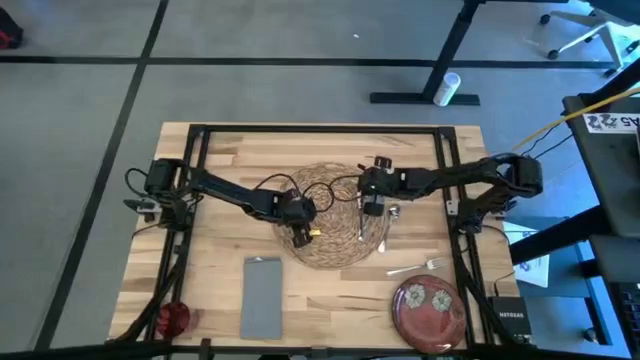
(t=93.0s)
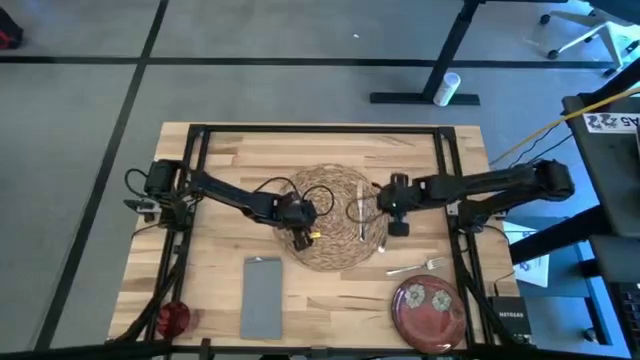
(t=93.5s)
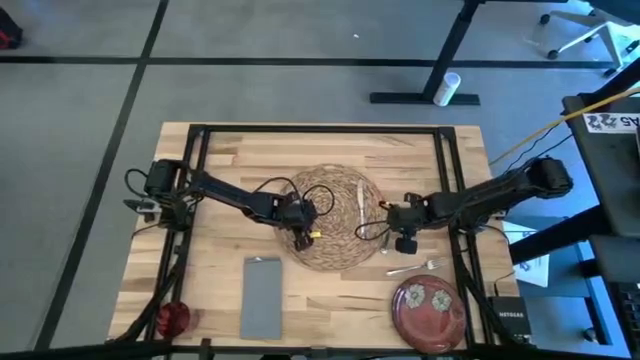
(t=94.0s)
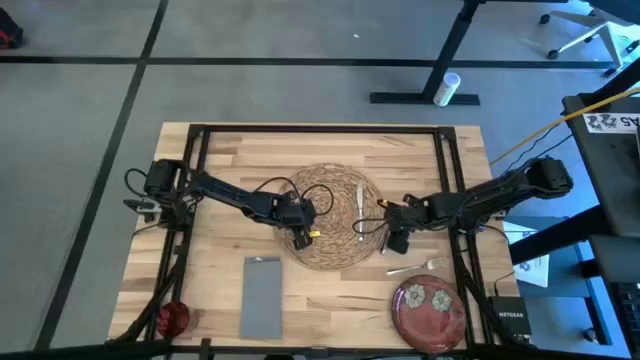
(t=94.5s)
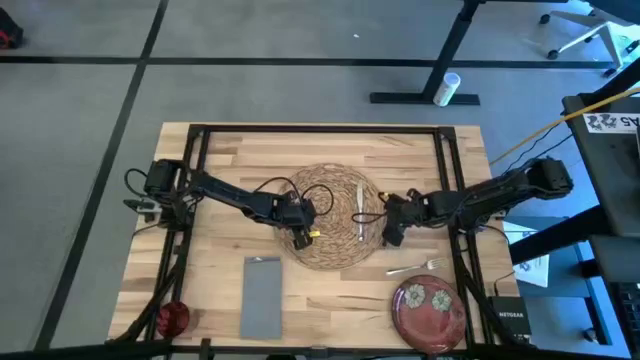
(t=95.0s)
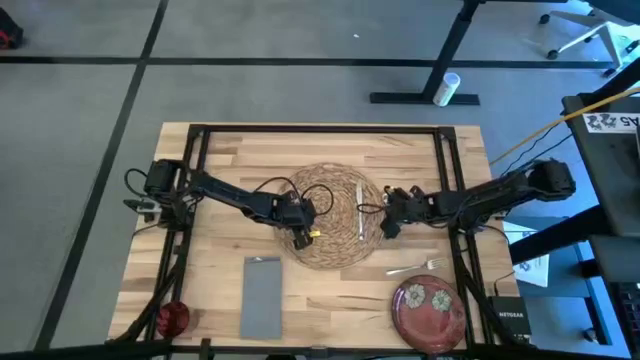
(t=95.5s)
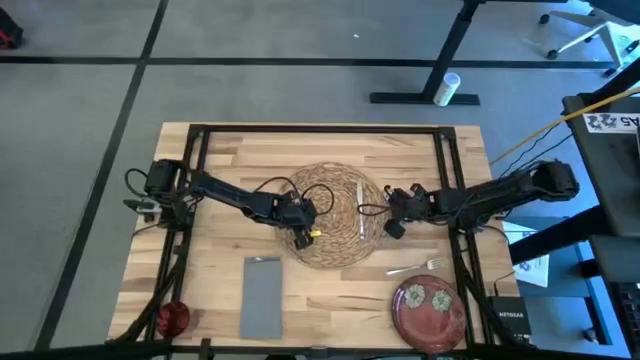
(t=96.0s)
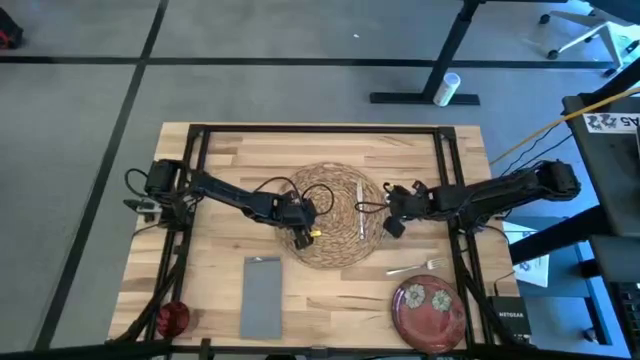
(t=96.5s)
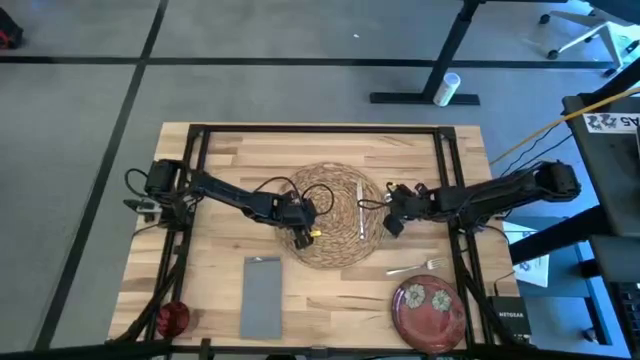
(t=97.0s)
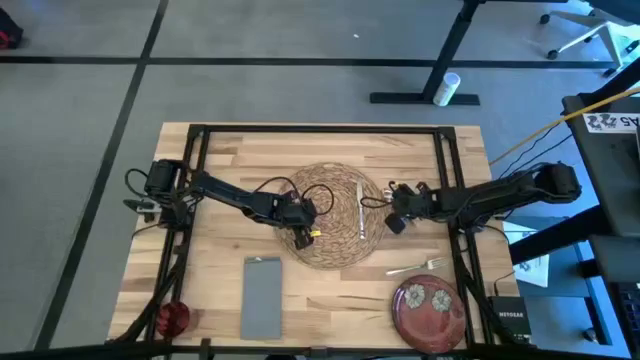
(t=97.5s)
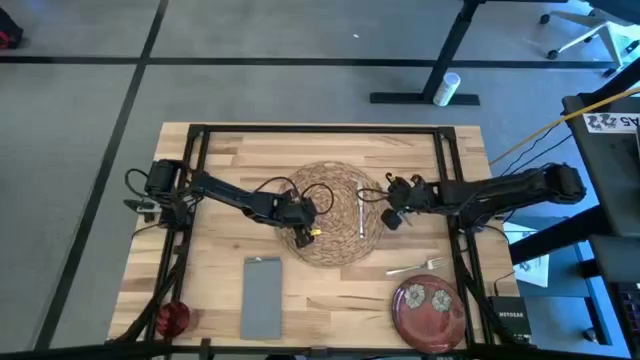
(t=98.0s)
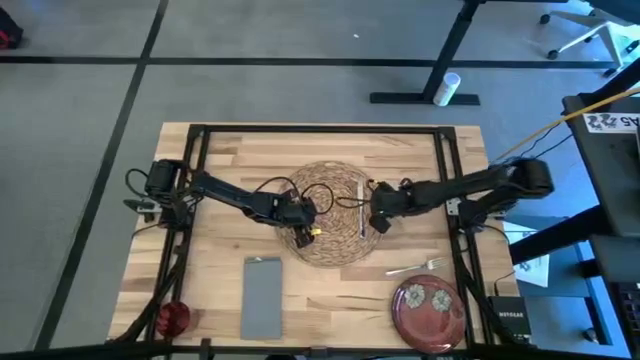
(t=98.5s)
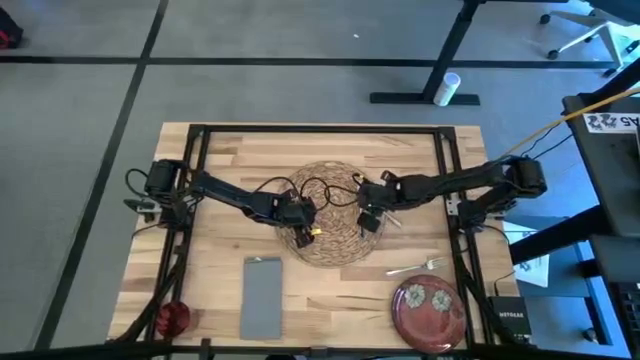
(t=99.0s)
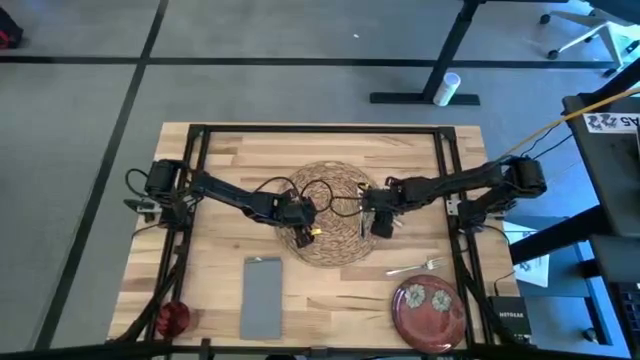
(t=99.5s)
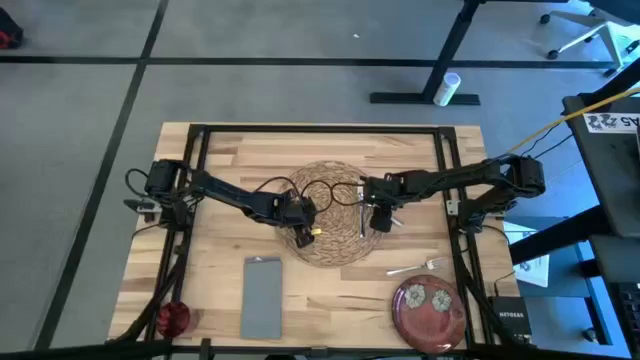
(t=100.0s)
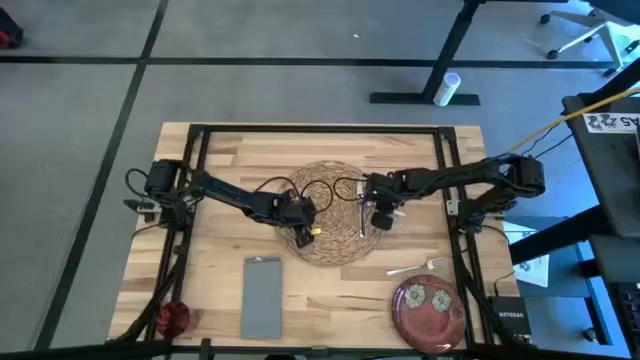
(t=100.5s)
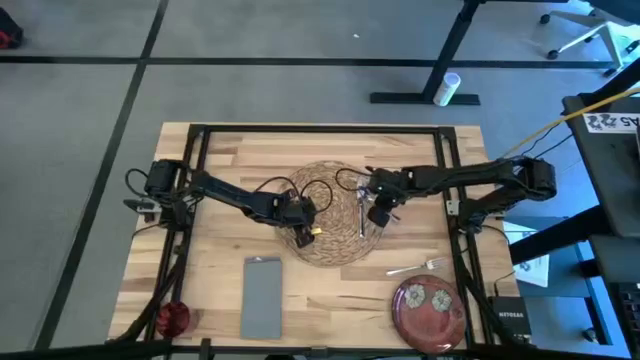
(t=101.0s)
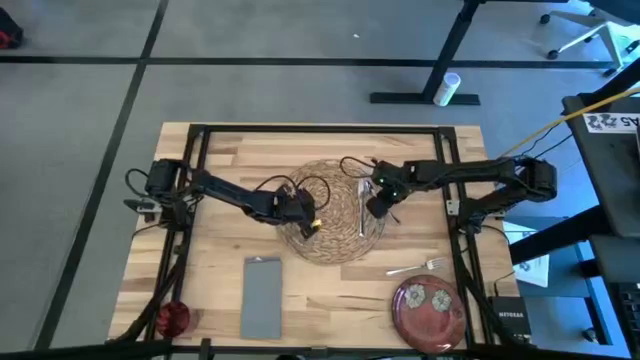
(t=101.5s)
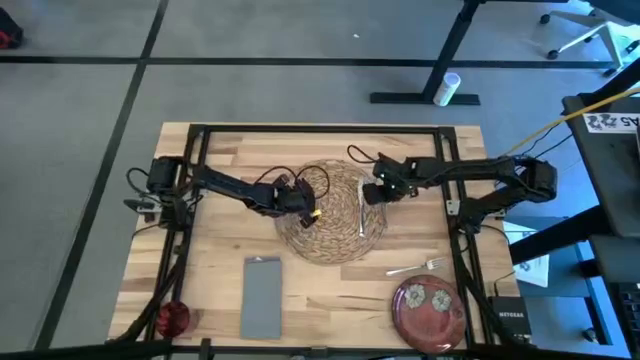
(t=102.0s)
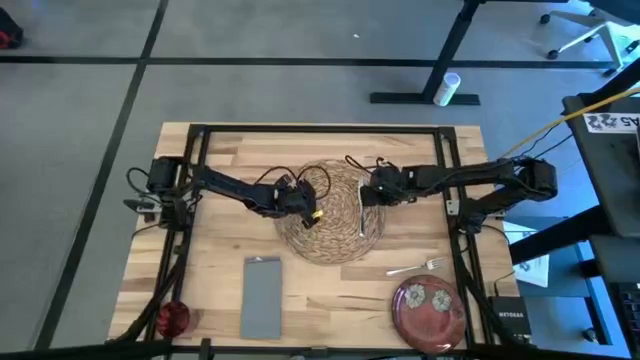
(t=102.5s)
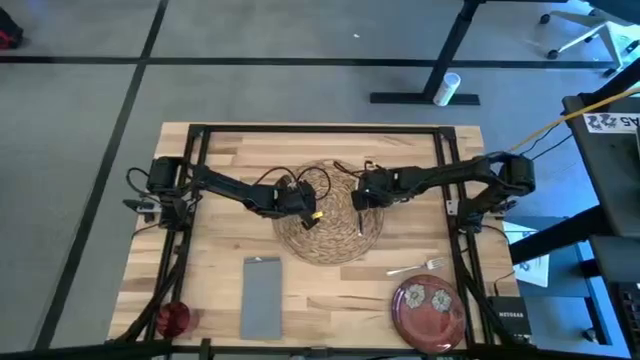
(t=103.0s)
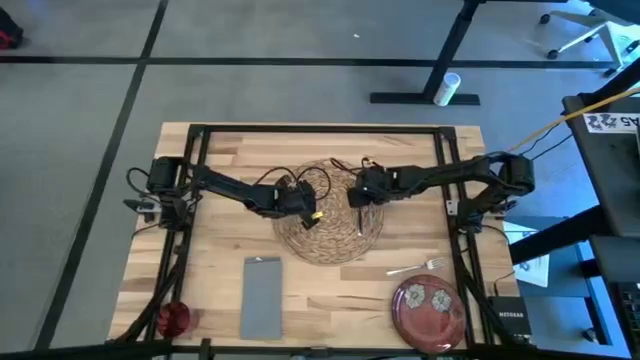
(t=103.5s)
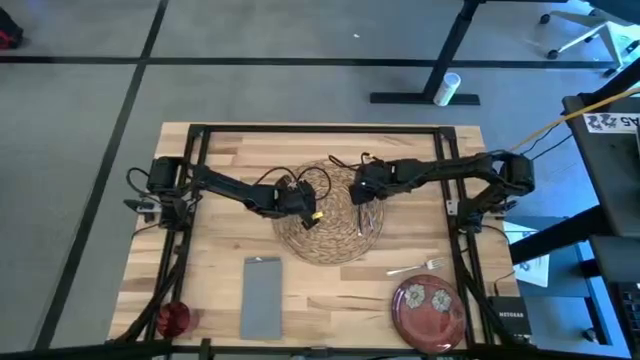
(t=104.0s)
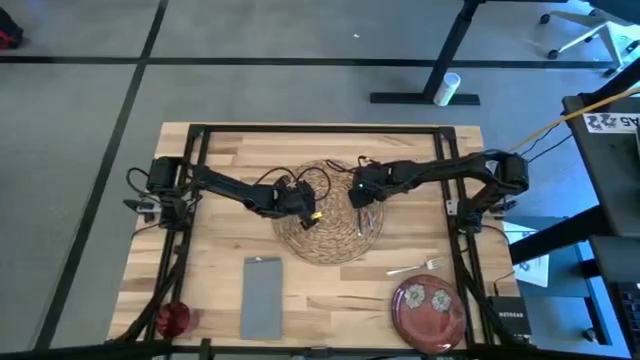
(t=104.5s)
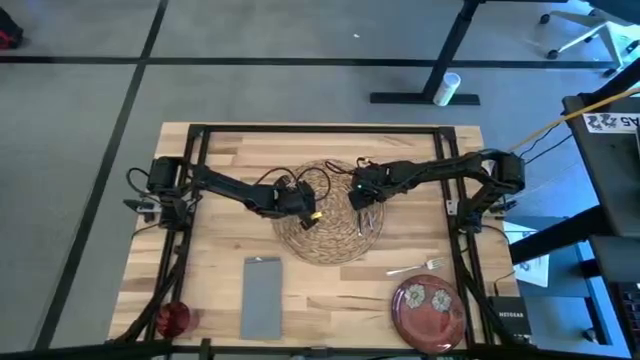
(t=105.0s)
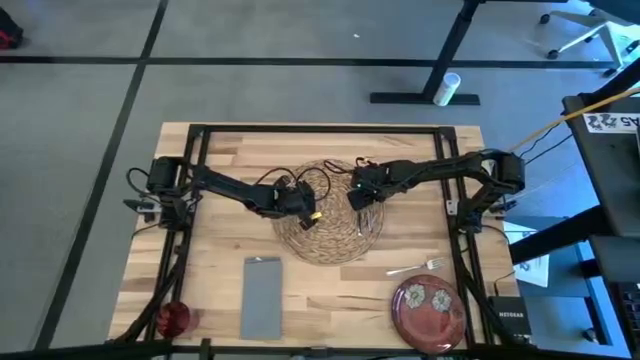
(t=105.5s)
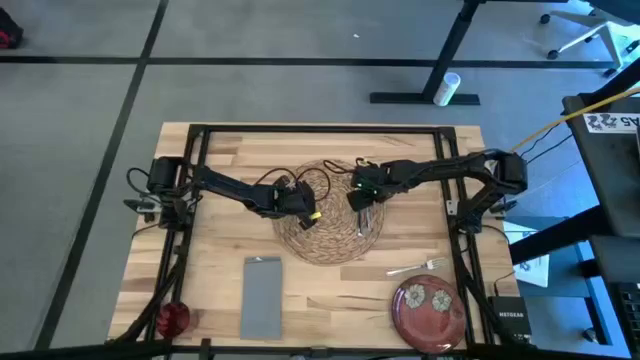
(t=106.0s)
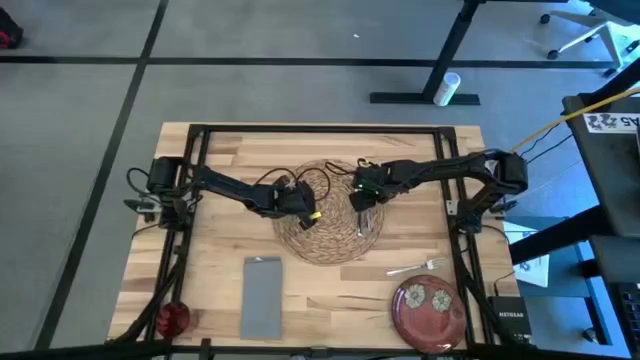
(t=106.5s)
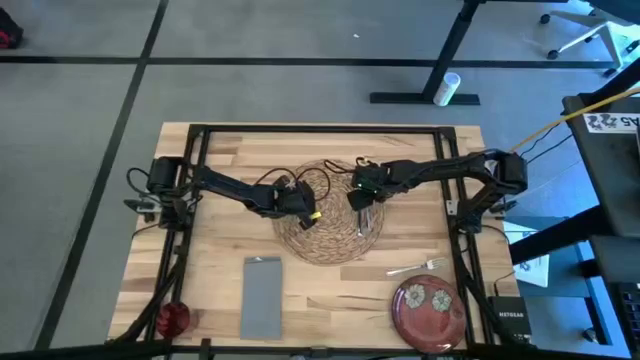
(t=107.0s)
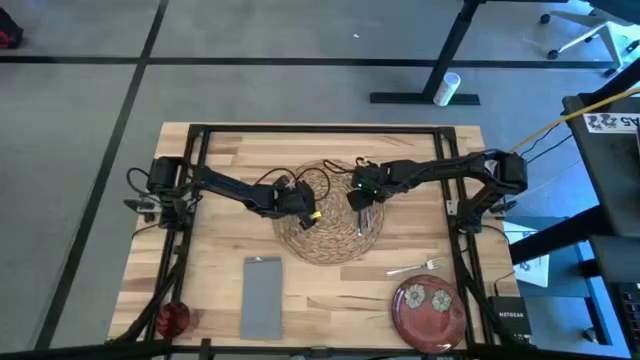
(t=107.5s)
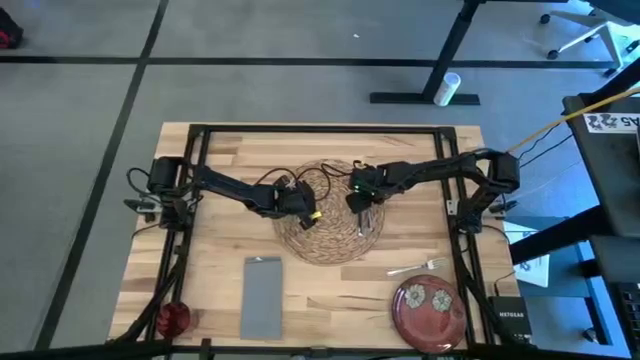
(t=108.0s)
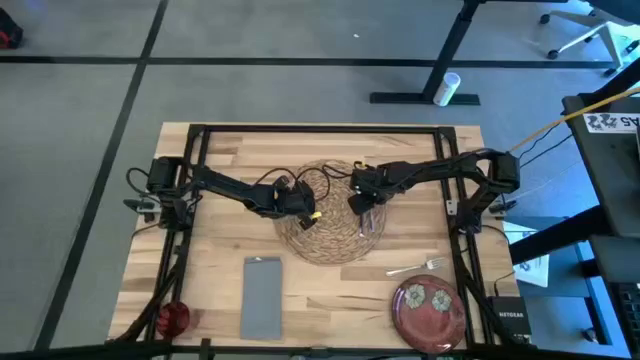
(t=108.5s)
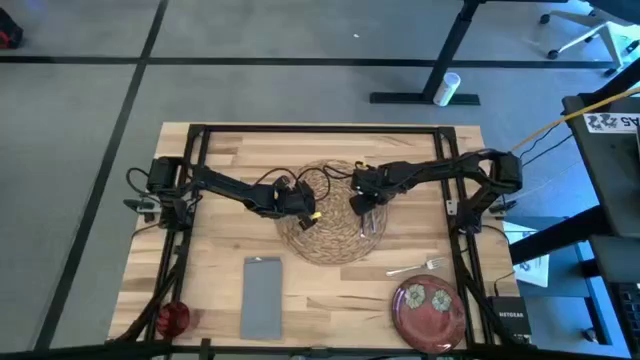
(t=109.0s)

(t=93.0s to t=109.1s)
Task: Set table place
Put the silver spoon to the right of the silver table knife on the brown placemat

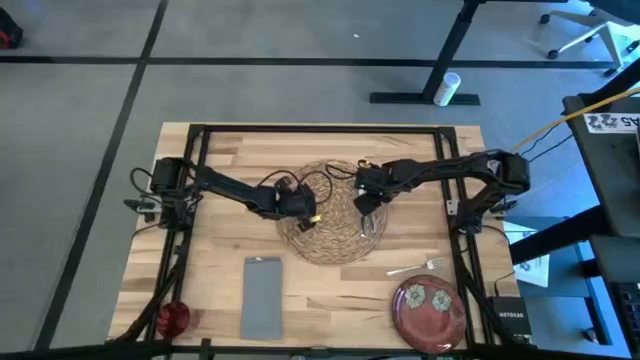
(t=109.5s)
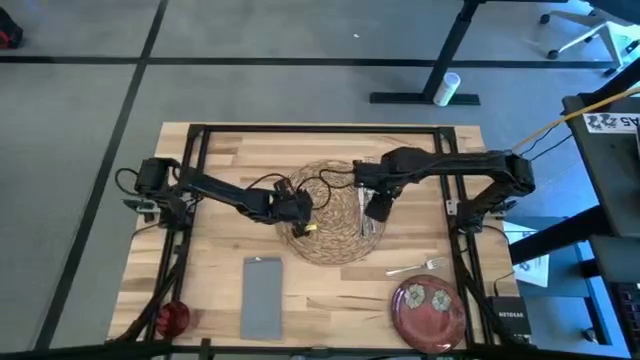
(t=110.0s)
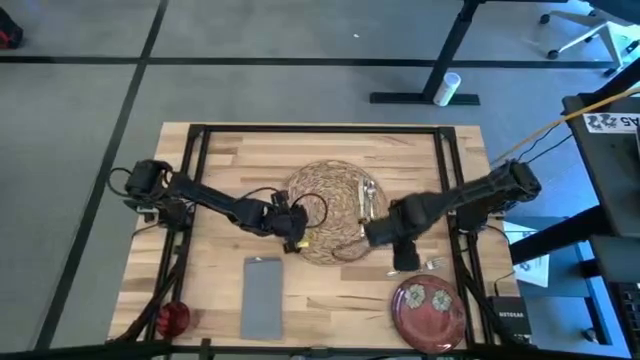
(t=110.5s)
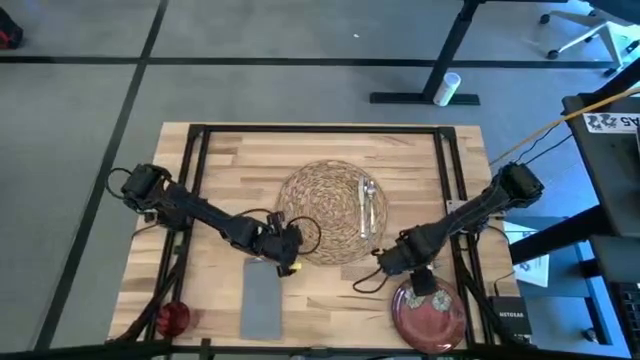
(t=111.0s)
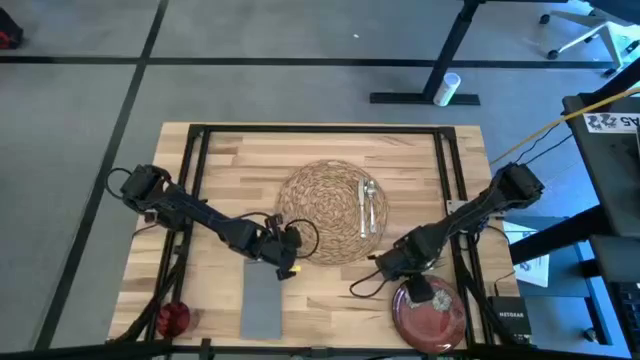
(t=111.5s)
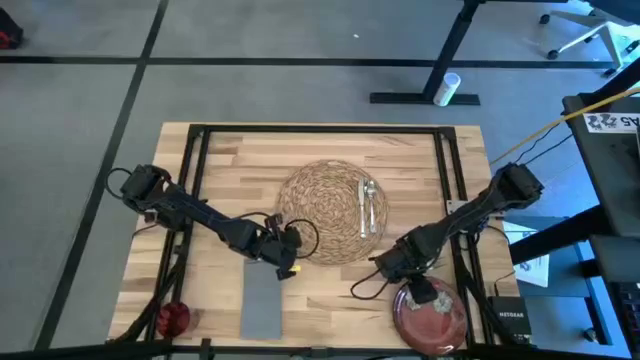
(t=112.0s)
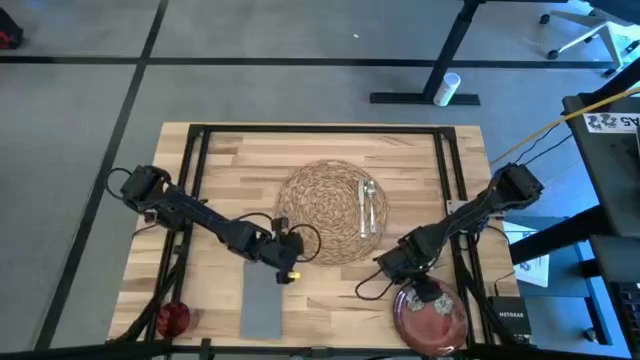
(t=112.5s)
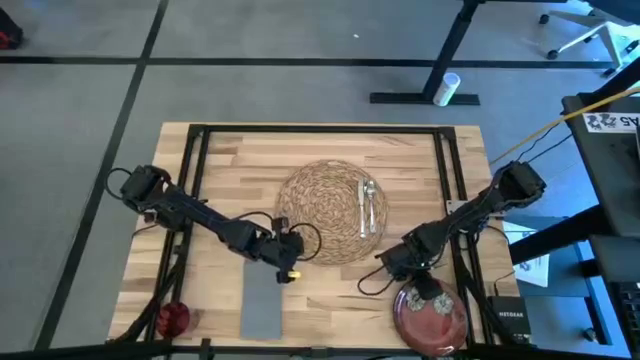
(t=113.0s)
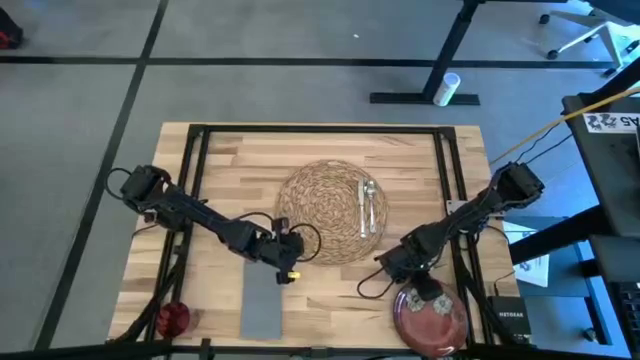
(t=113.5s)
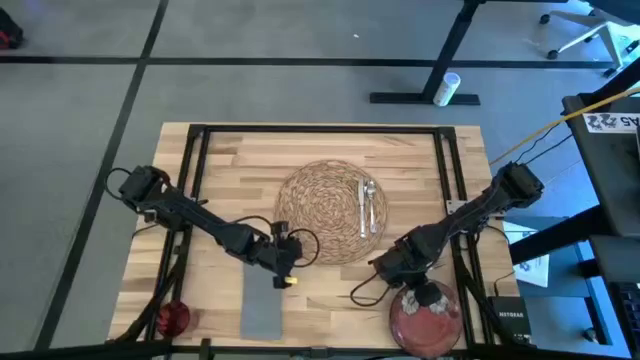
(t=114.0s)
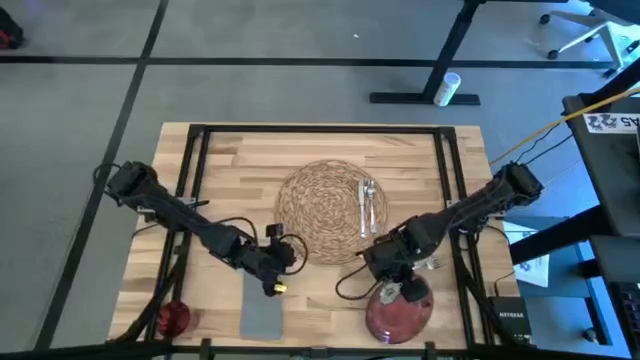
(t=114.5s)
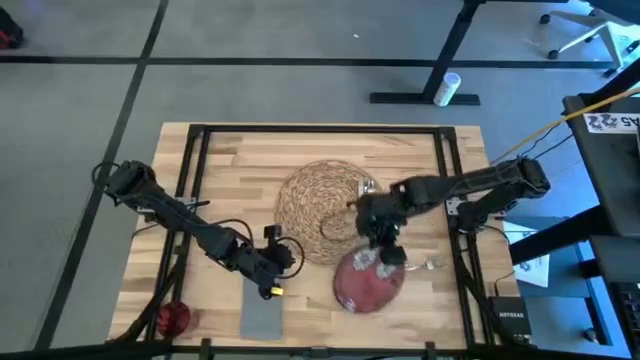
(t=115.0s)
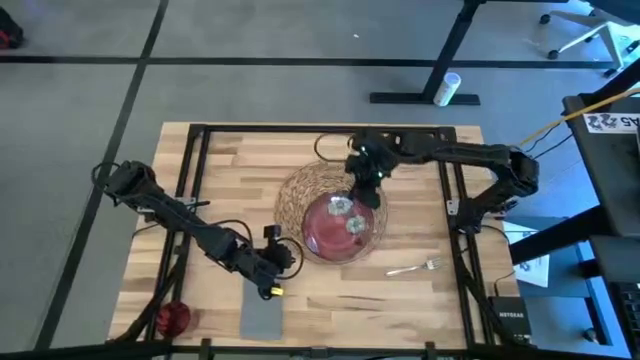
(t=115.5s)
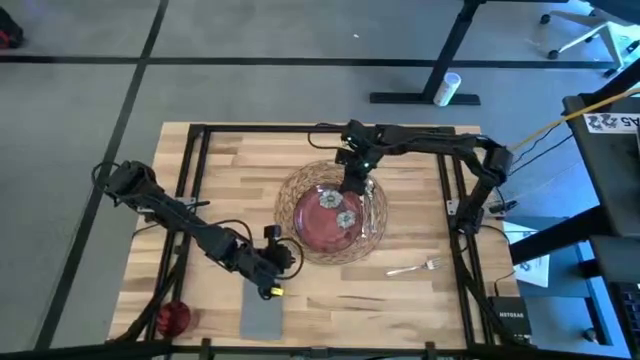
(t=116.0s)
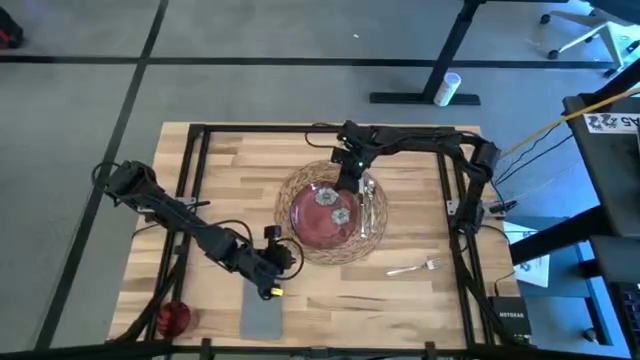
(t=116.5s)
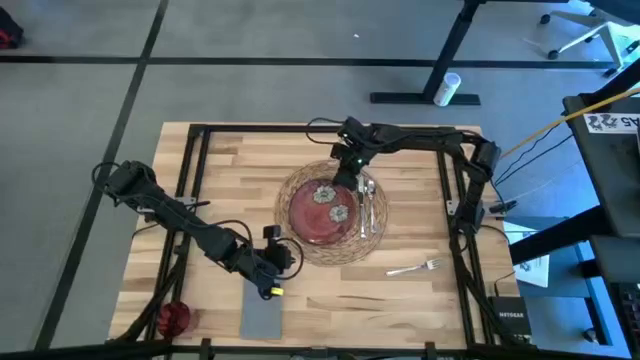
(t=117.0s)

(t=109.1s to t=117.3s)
Put the red plate to the left of silver table knife on the brown placemat
